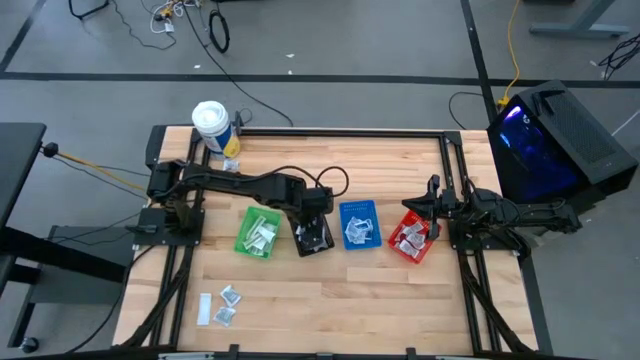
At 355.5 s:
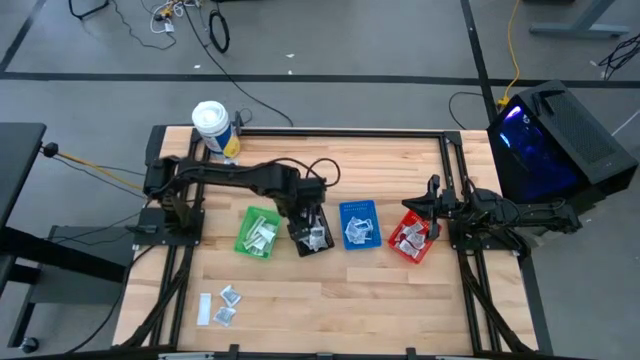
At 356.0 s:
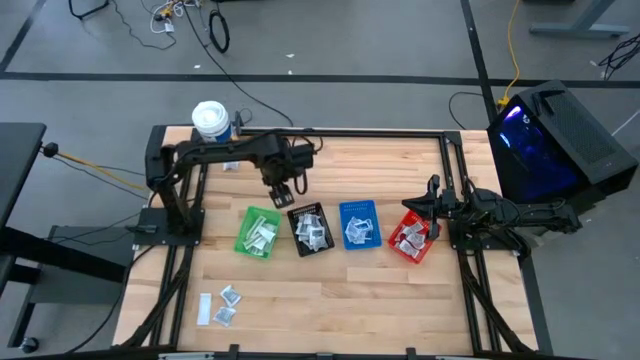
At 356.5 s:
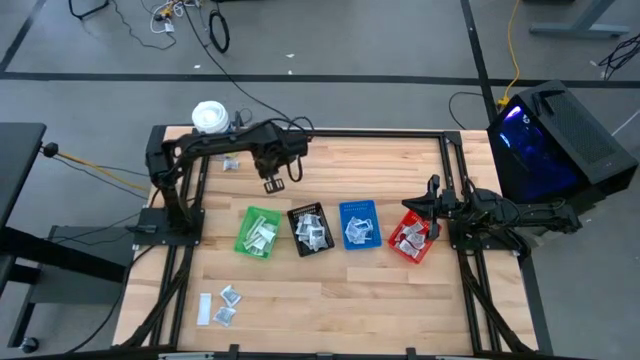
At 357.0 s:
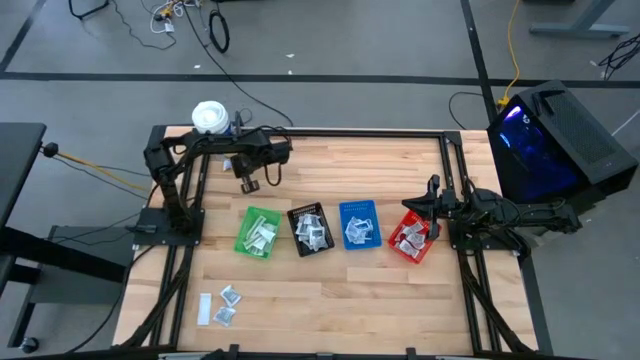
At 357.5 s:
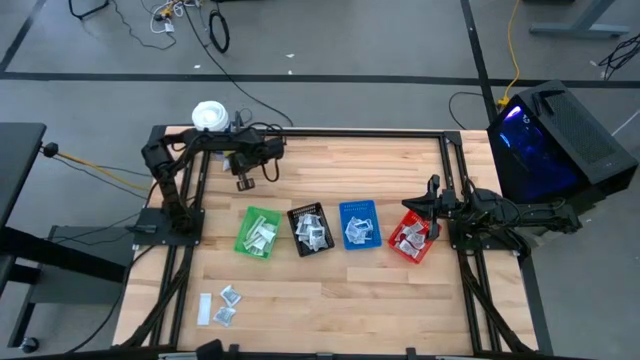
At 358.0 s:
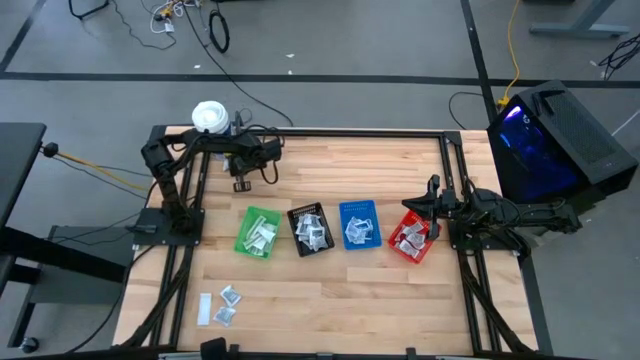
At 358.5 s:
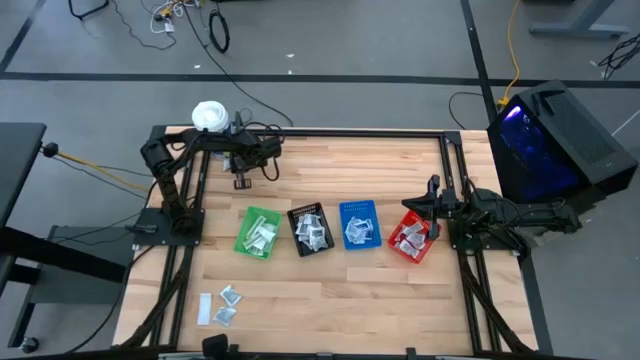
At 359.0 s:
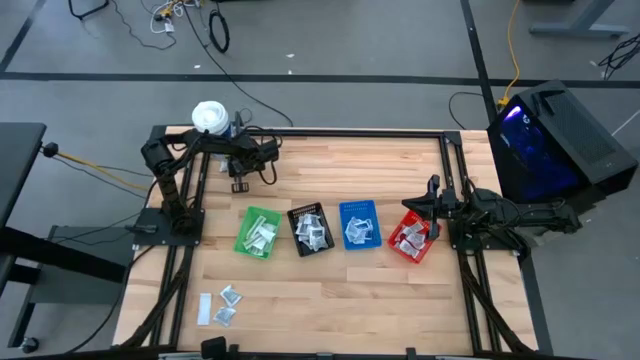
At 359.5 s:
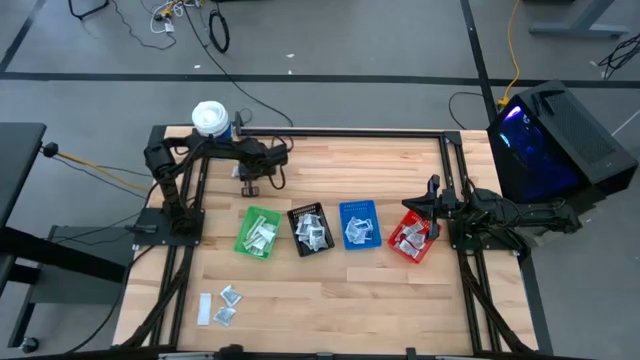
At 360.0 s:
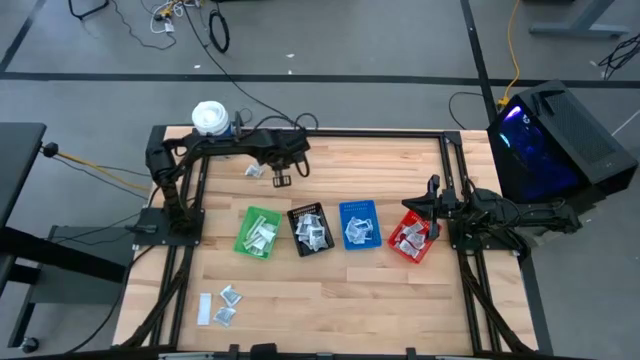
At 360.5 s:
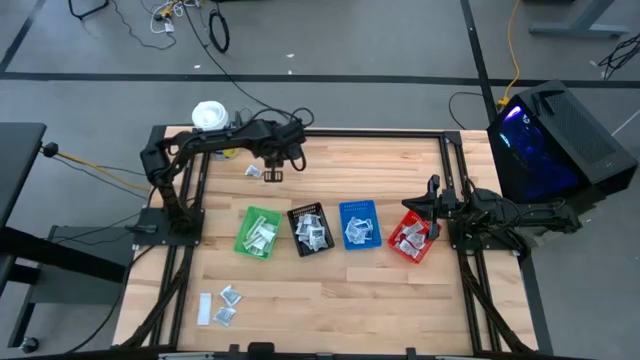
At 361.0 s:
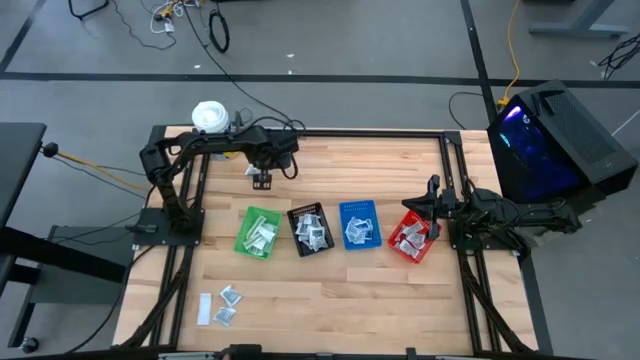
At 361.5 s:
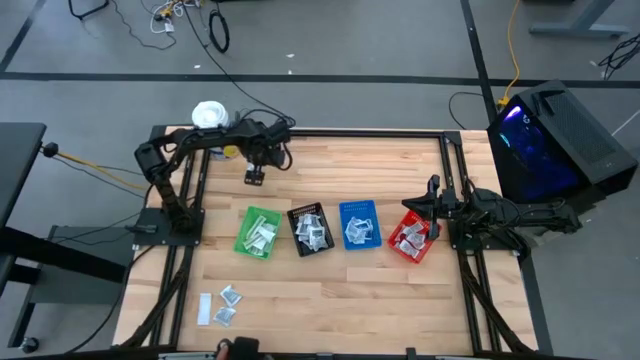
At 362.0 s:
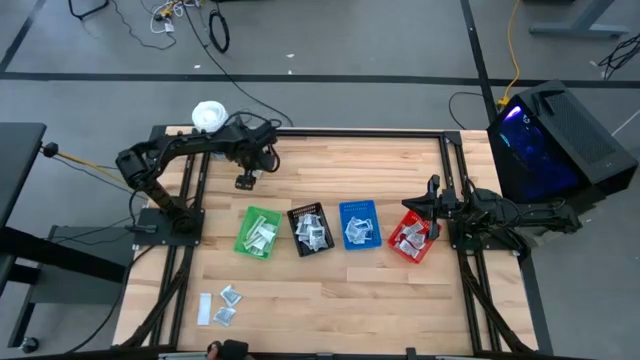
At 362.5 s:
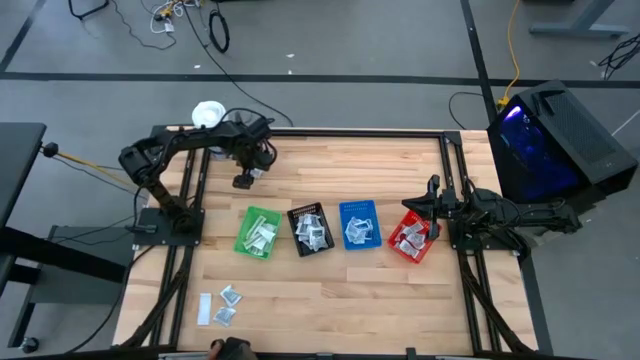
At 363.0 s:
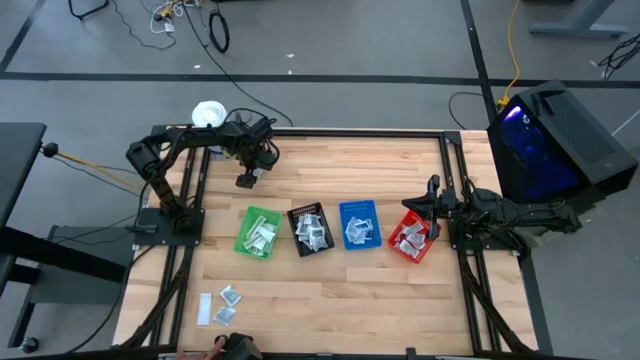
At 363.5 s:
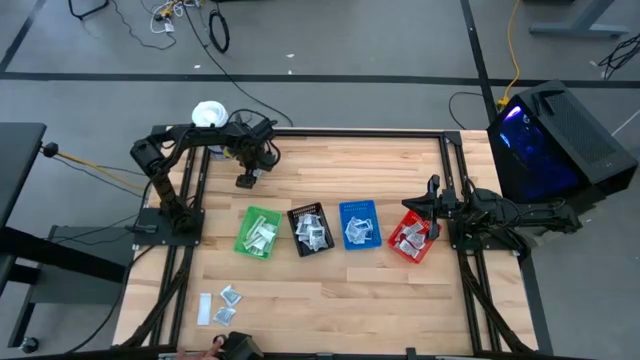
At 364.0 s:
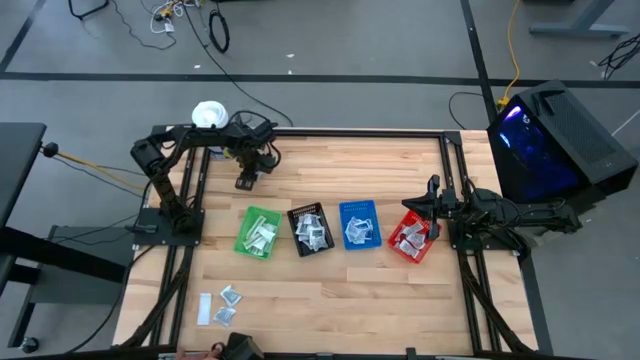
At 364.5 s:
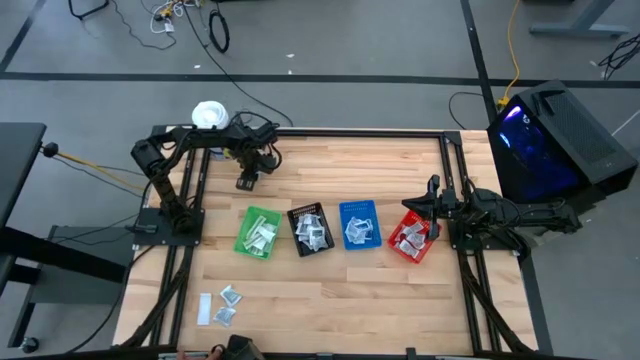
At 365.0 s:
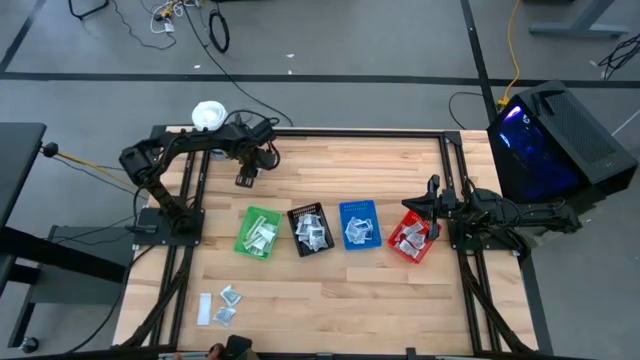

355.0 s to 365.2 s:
Task: Pick & Place First Aid Supplies
Put the towelette pack into the black basket

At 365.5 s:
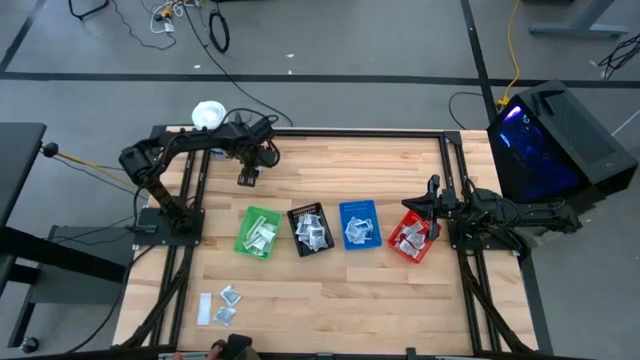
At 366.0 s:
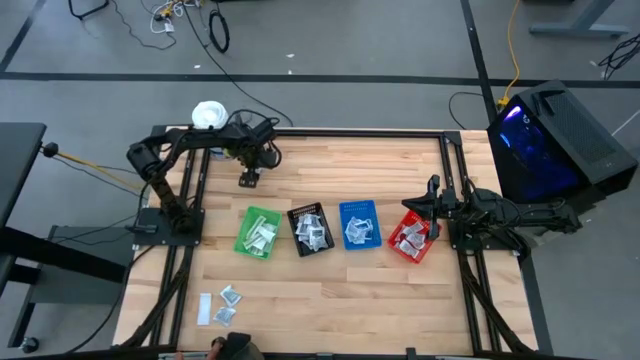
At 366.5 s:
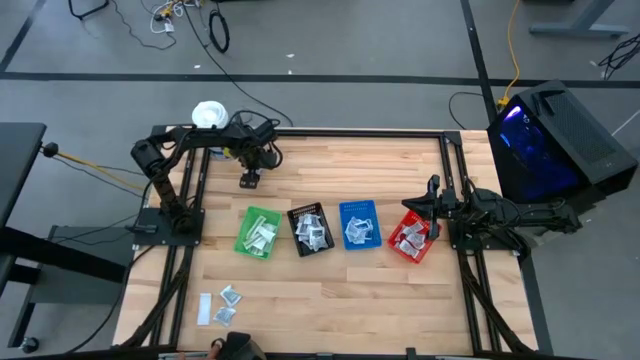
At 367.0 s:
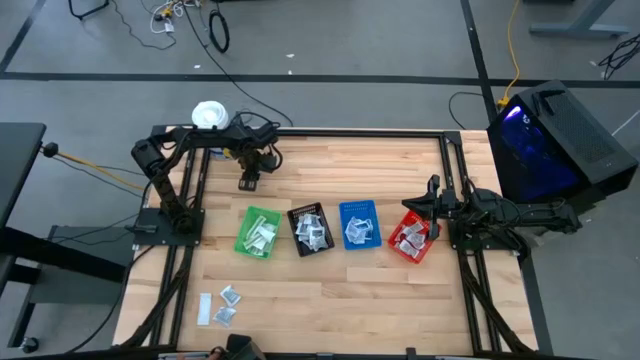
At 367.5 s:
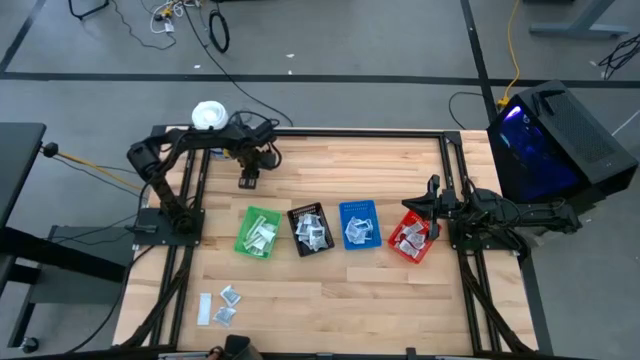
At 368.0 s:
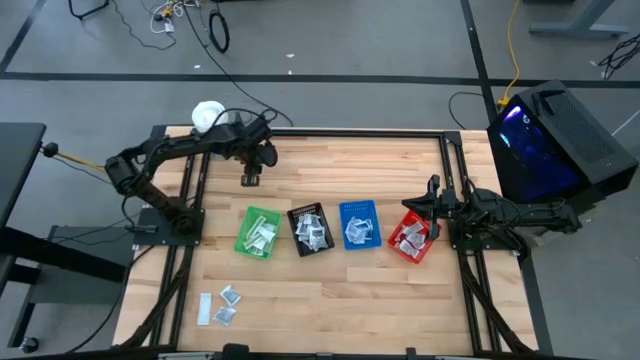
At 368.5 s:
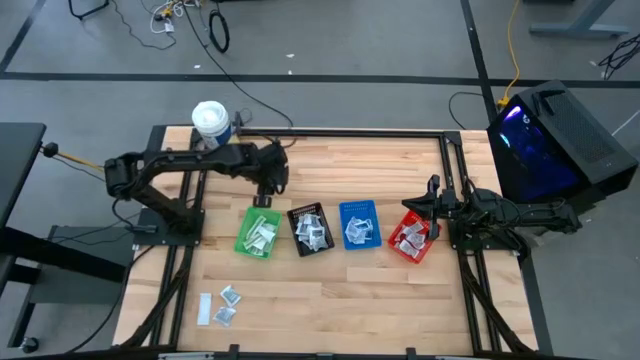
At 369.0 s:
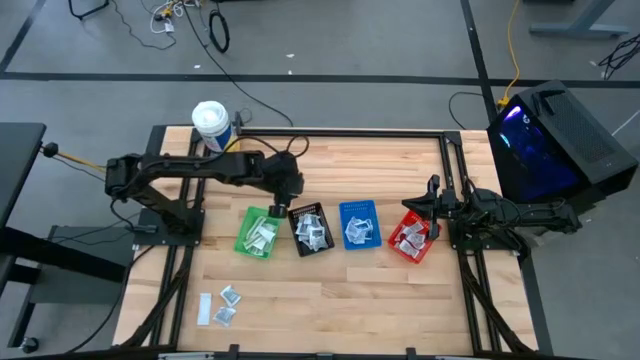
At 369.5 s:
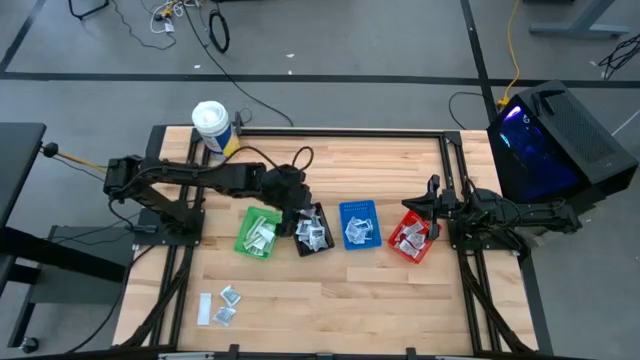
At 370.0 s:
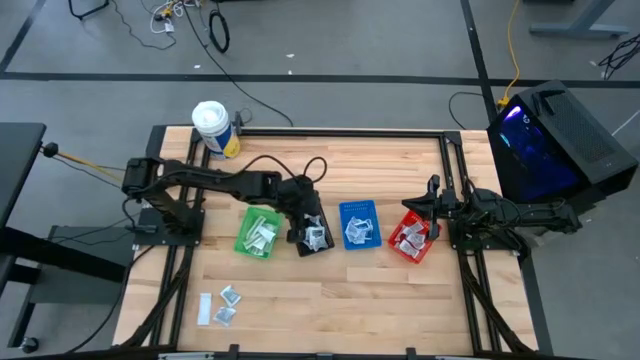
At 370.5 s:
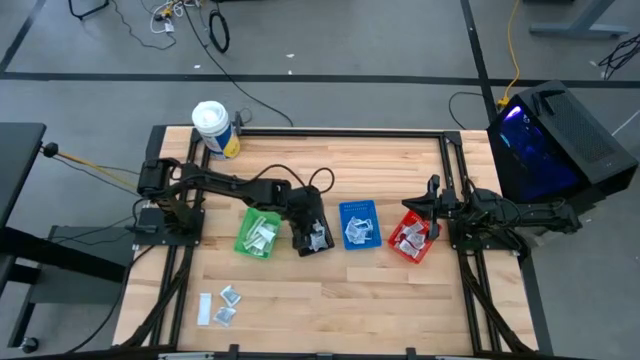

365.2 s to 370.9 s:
Put the towelette pack into the black basket
